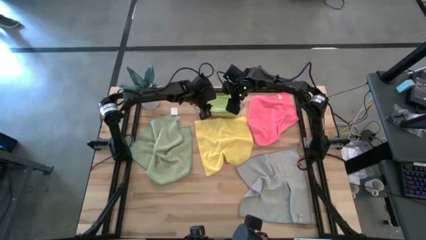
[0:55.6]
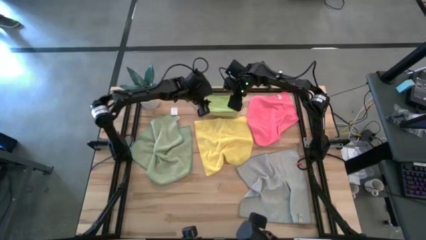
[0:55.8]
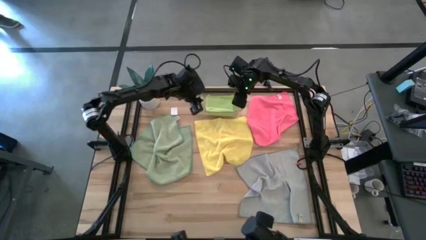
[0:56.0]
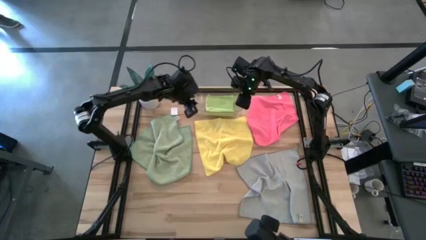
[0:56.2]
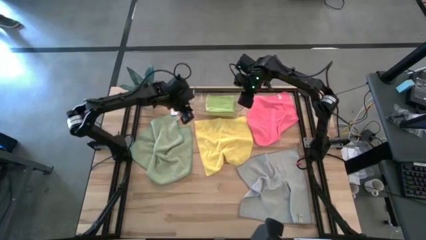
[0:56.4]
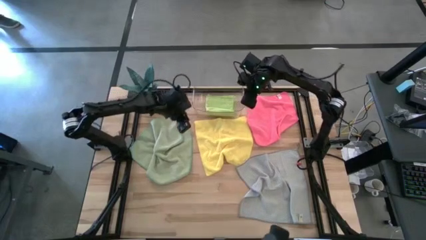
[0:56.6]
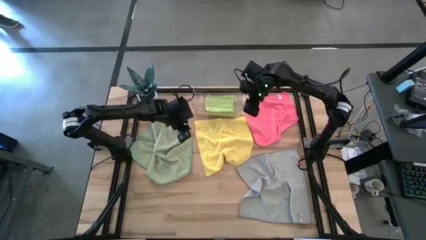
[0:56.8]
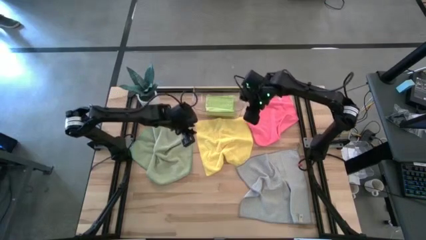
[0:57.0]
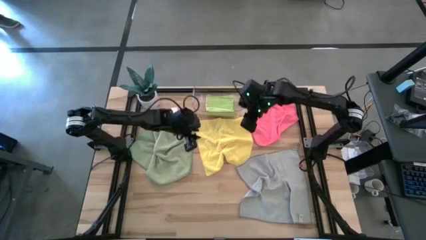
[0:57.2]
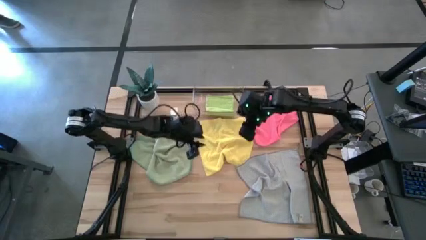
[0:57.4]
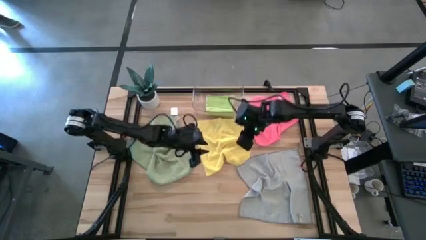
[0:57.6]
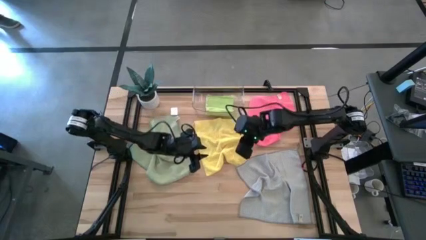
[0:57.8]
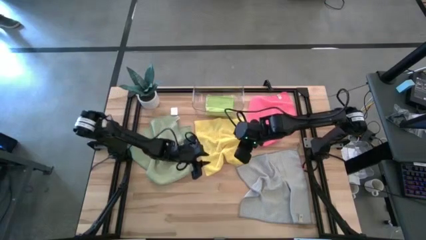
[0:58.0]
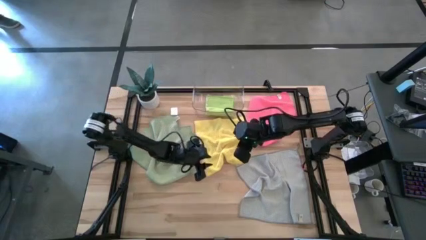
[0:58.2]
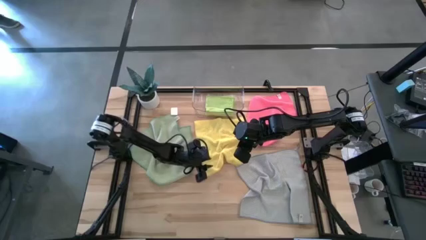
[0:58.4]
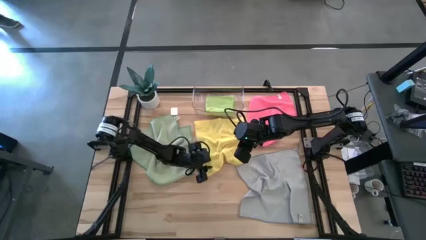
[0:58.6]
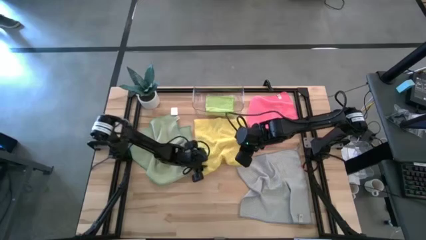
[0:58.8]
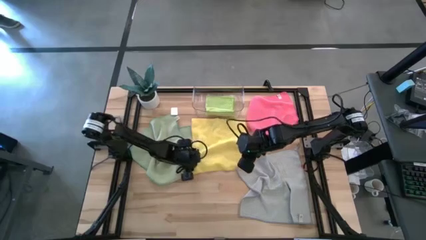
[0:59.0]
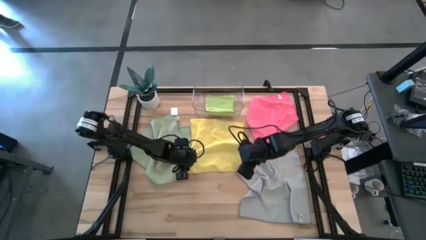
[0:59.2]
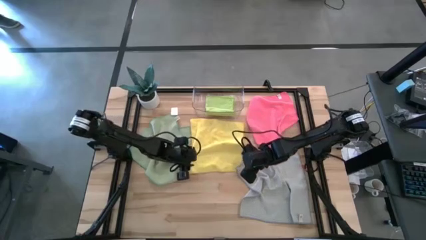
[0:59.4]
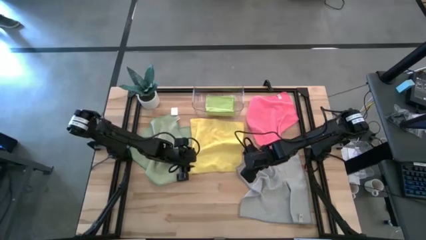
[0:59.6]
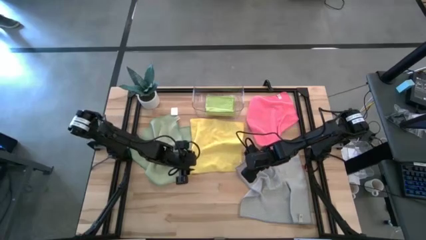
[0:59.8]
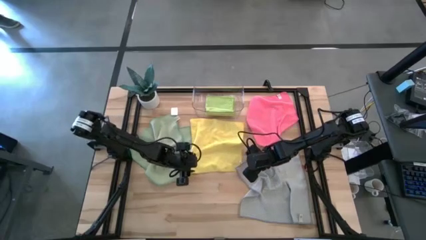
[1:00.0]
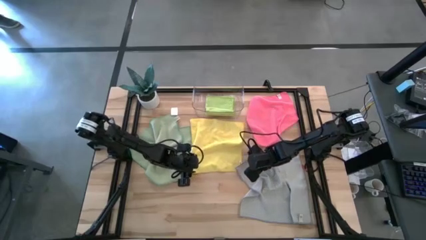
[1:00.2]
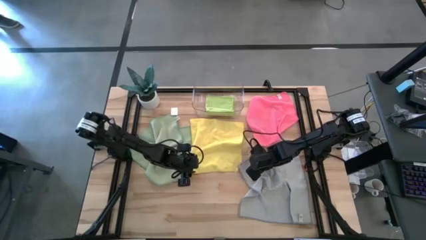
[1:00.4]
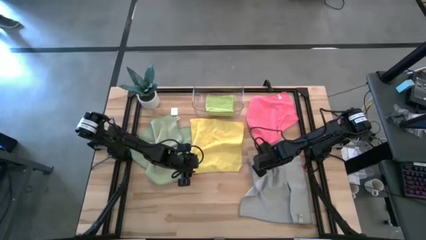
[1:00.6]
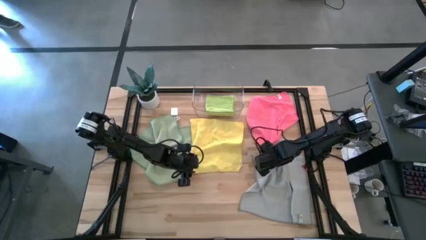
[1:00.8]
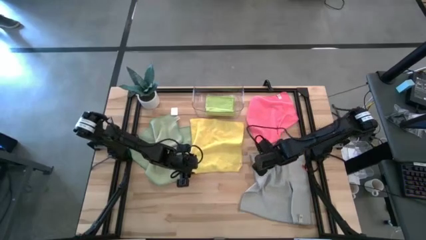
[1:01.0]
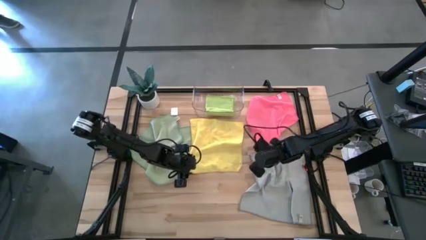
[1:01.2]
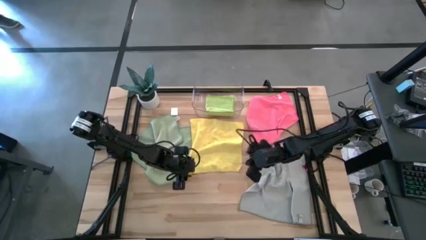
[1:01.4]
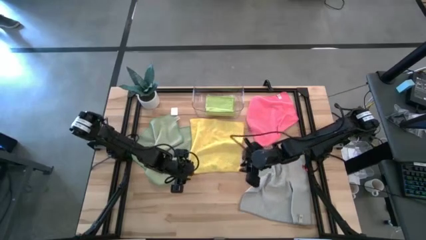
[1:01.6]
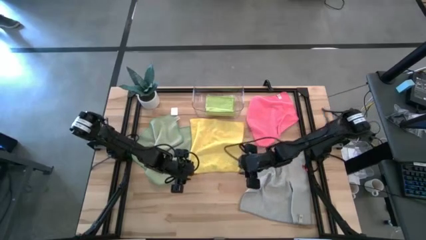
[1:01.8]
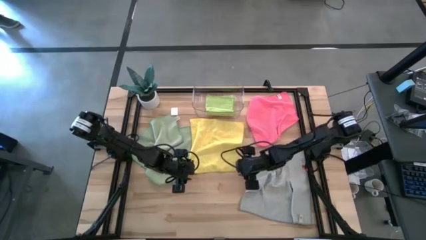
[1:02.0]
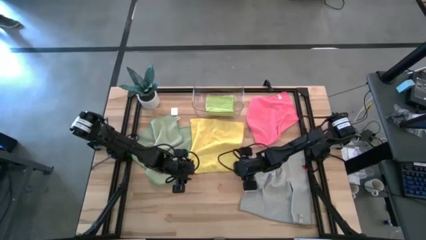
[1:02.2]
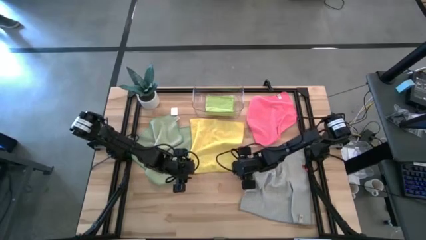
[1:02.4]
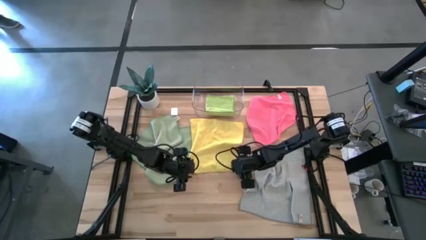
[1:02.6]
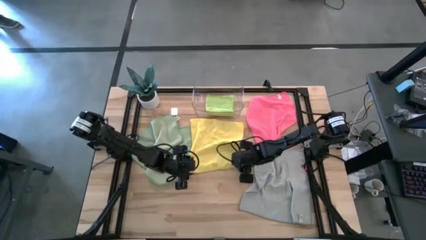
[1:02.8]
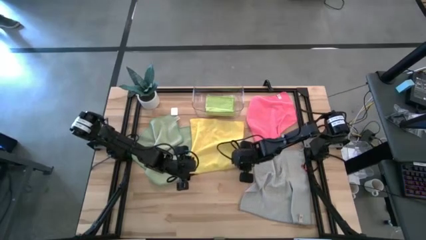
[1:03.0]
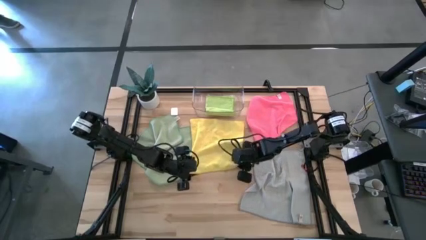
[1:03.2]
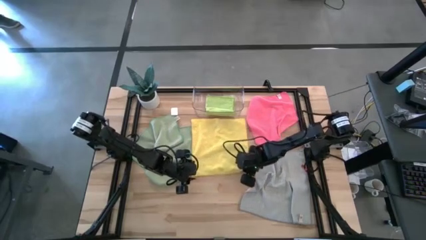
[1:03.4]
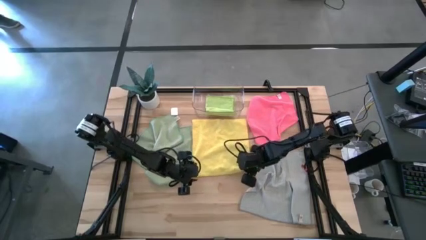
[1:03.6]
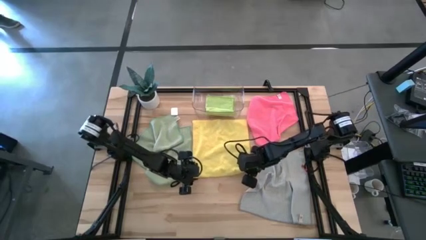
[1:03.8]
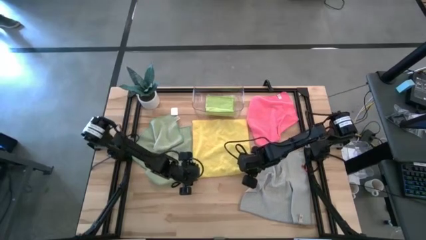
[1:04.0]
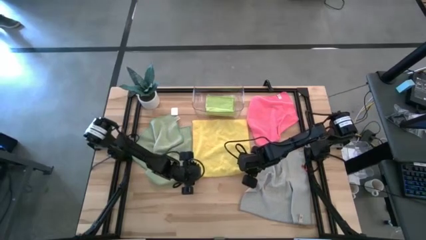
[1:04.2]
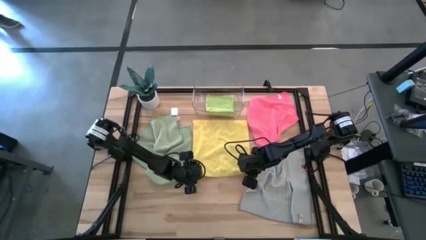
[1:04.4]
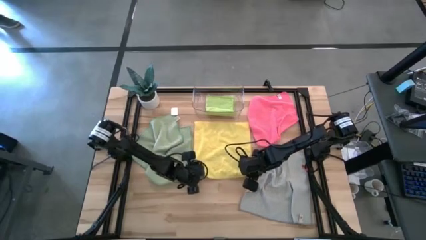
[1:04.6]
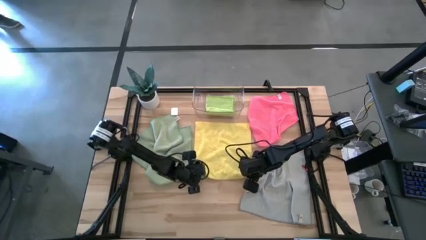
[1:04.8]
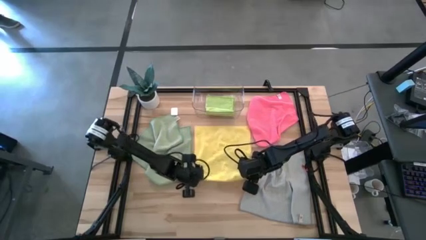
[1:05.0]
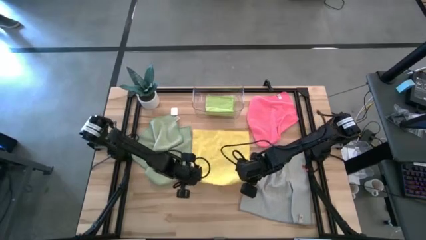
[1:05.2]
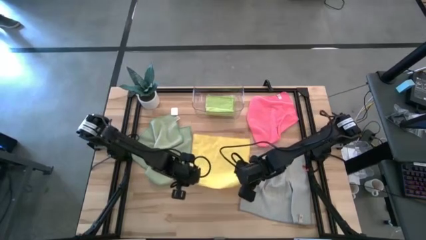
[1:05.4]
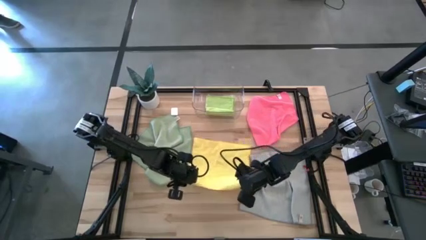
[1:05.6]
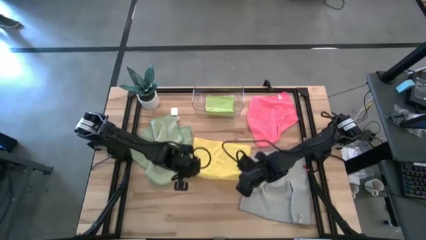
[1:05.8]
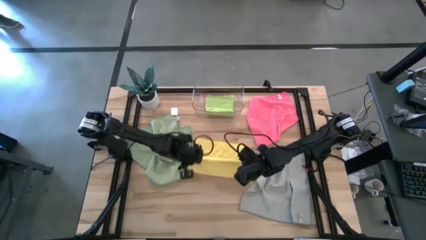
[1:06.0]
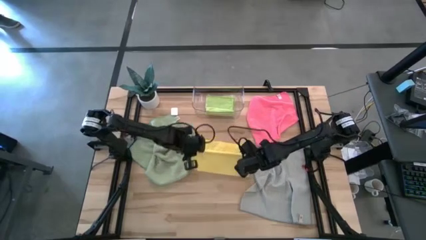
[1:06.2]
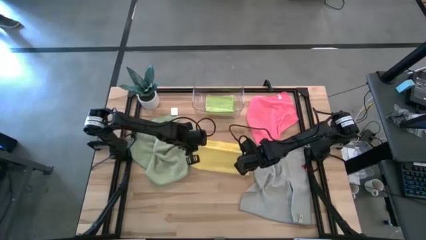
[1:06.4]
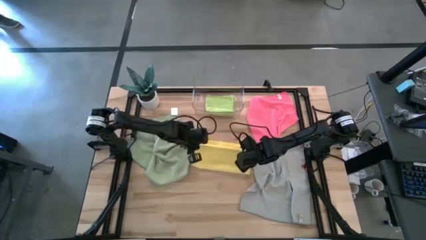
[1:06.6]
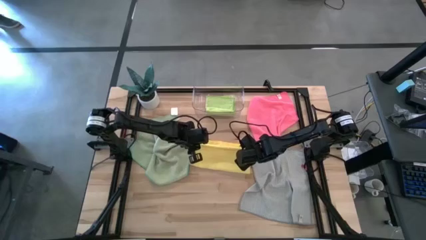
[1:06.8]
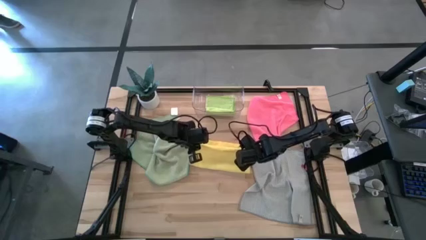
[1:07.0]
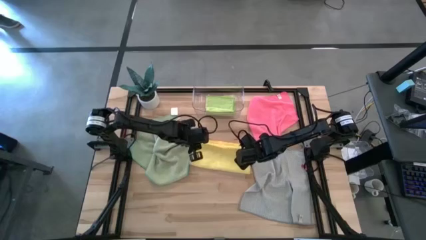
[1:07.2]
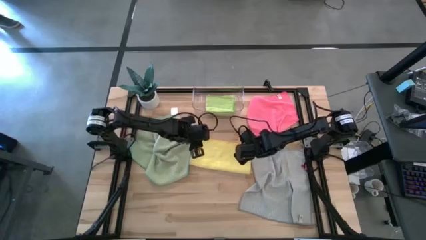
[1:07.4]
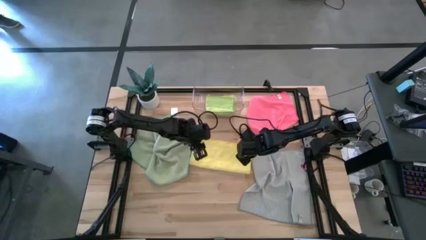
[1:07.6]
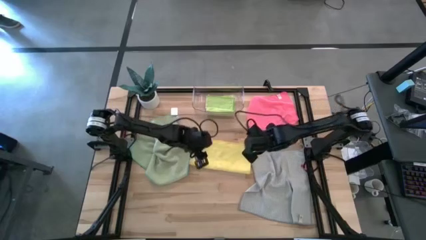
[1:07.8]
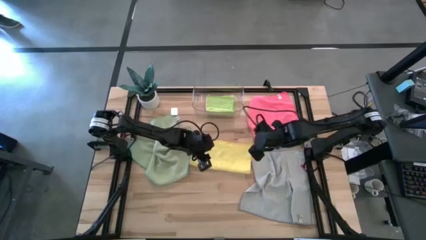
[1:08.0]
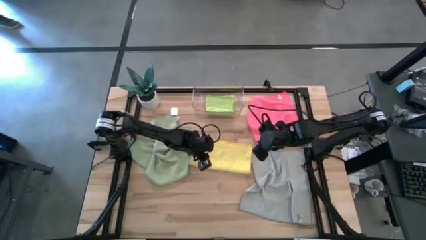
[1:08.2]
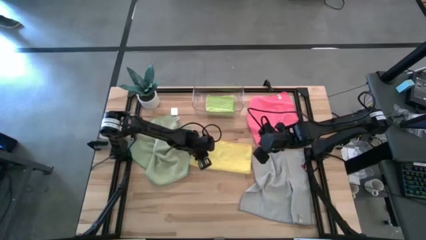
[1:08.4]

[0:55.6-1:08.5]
Task: Fold microfiber towels
Fold the yellow microfiber cloth

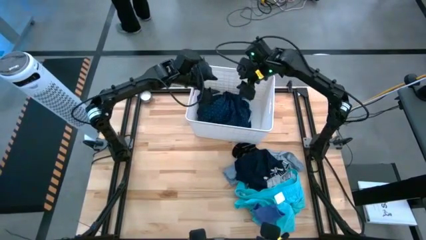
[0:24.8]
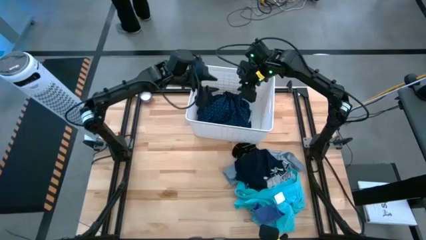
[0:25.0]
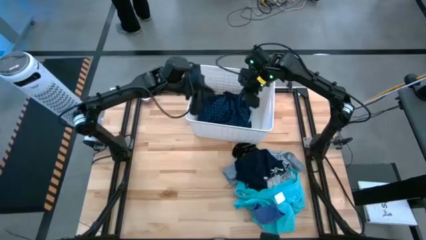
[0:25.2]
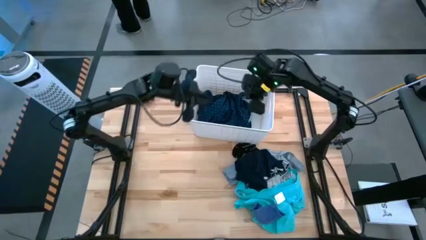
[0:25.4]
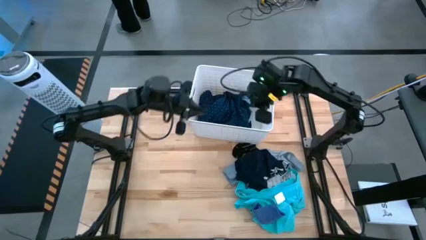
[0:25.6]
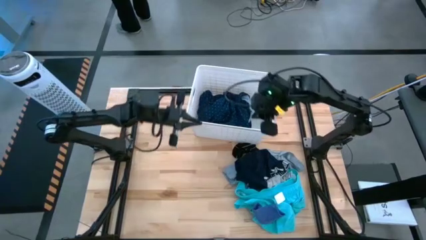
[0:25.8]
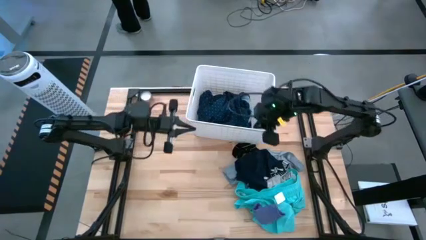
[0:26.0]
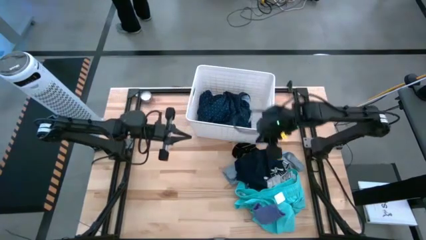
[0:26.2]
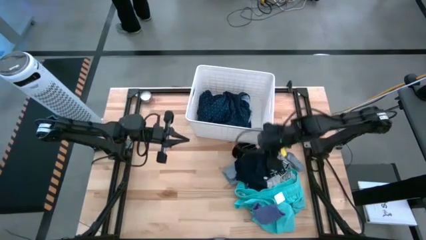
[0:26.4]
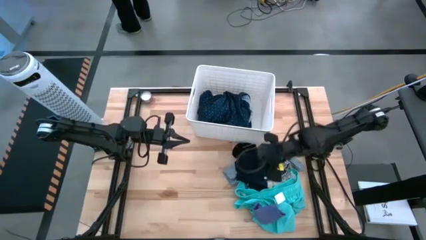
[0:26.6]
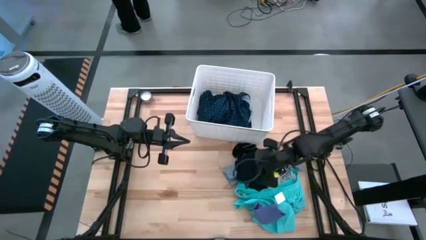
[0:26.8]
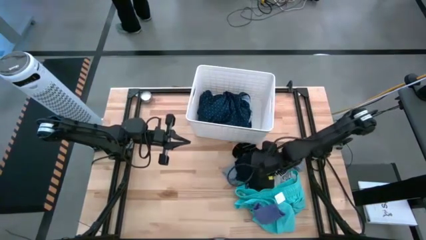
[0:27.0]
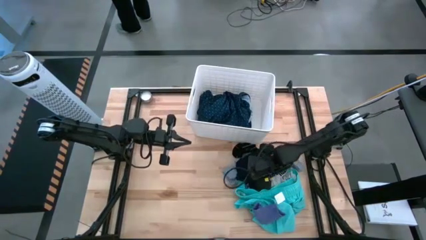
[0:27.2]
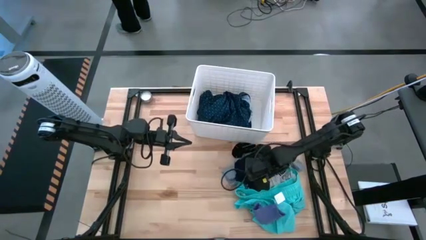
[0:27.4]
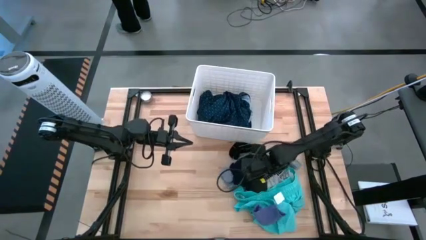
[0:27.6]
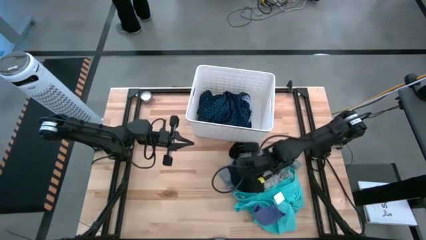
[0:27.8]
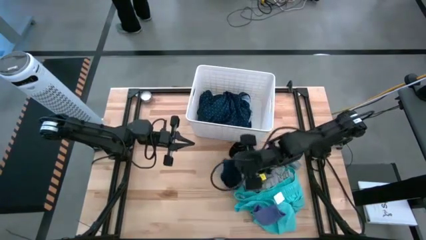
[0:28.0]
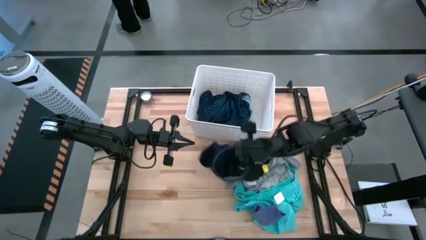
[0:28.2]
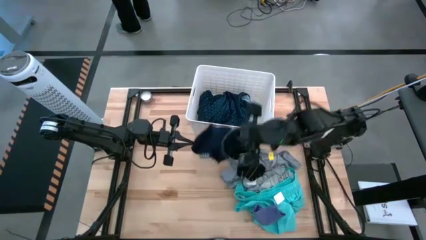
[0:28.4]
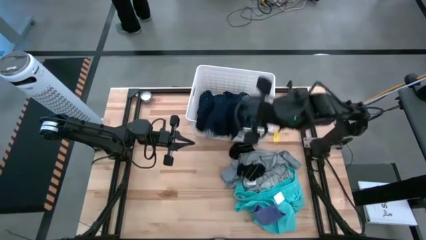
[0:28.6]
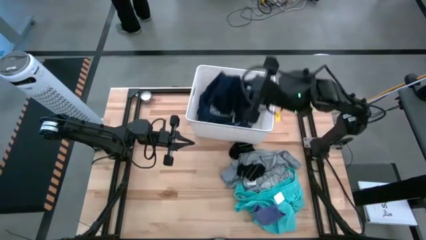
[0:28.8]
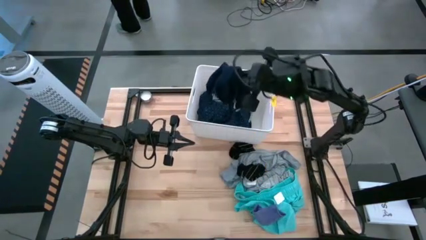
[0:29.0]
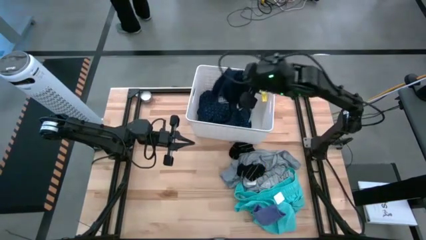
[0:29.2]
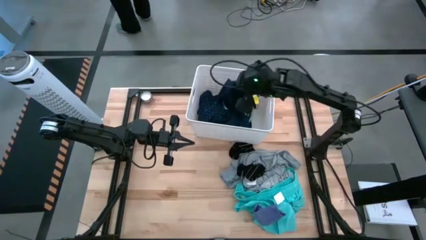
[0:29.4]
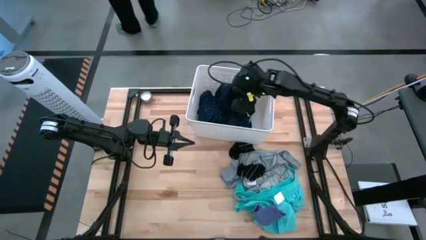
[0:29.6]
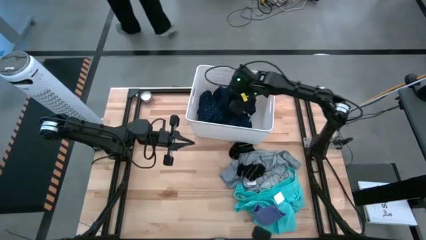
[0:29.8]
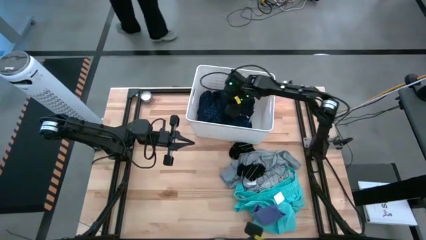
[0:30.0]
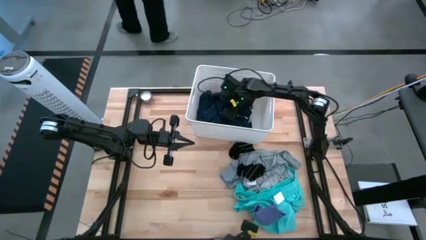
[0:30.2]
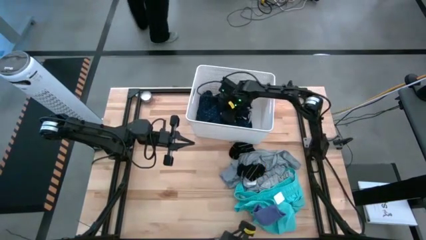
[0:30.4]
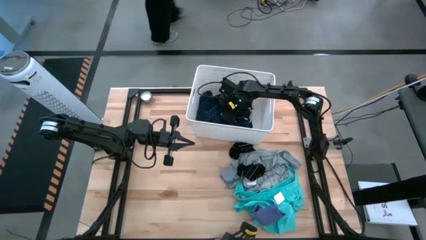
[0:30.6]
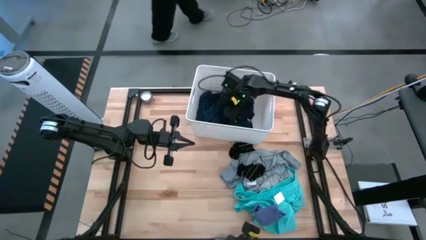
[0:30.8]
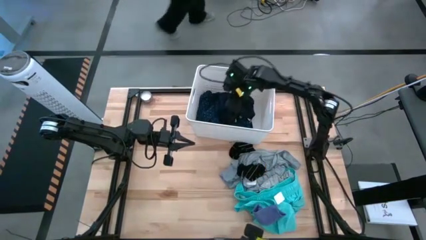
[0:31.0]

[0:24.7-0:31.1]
Task: Sort clothes
Put the dark blue shirt into the laundry bin
